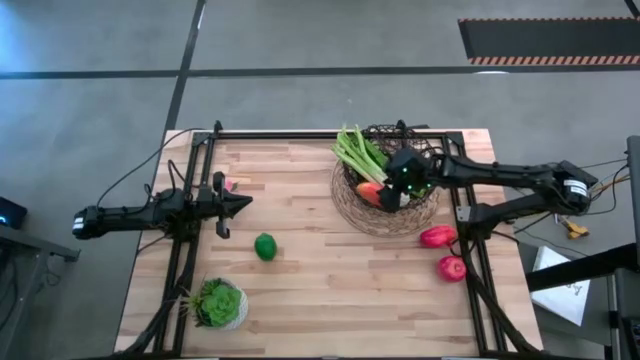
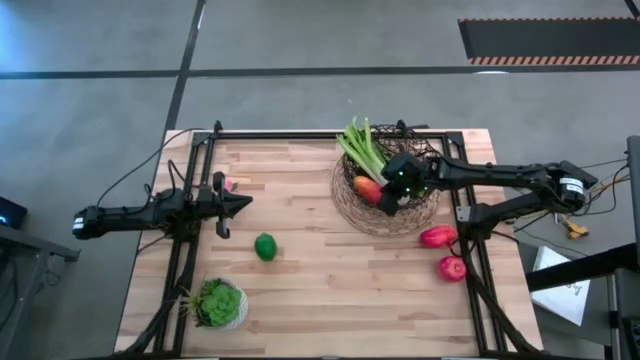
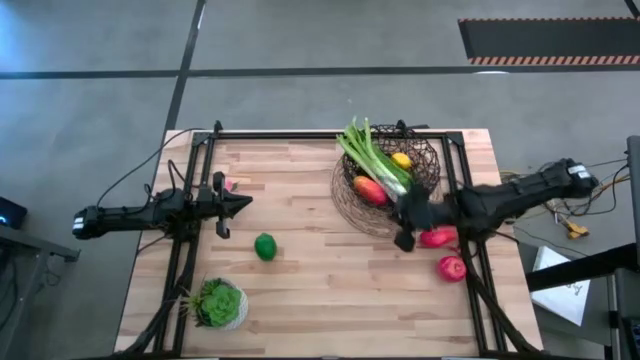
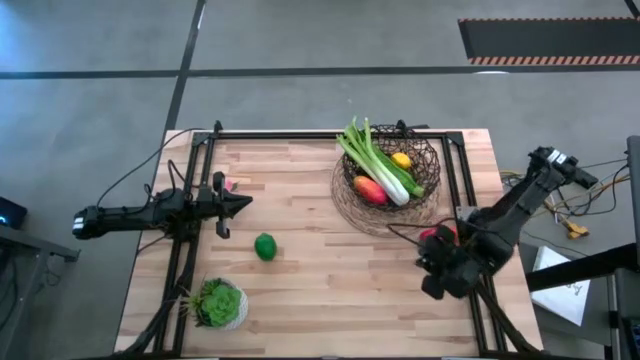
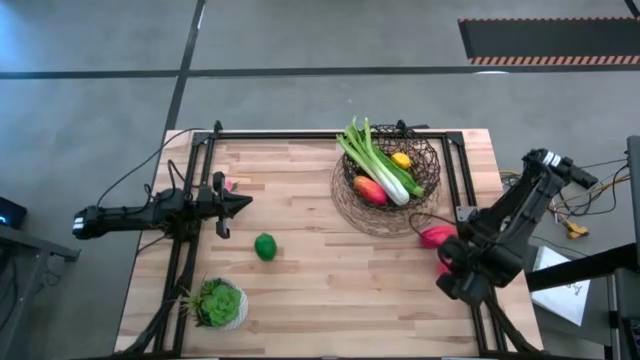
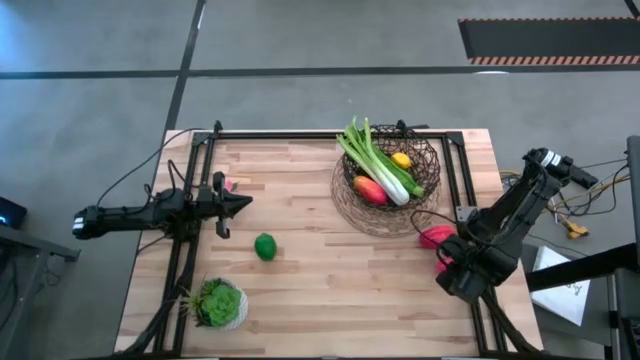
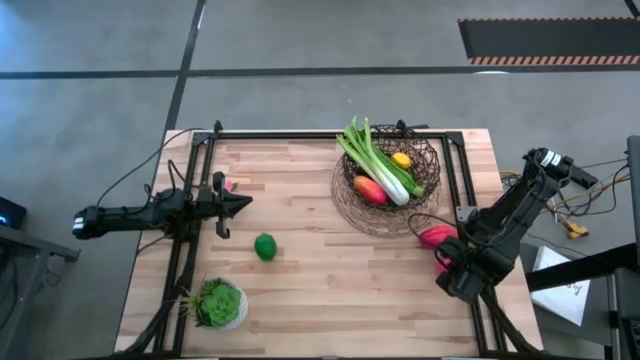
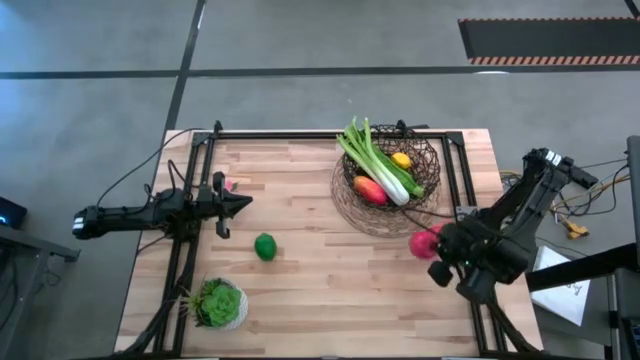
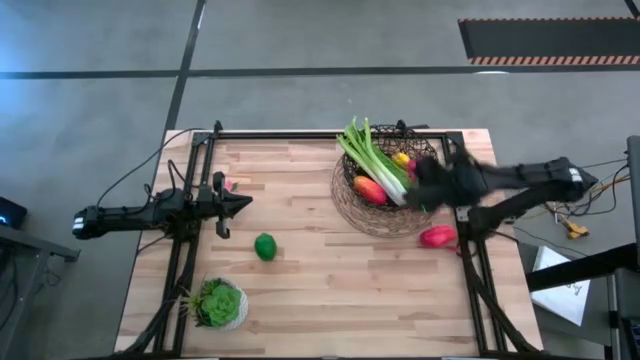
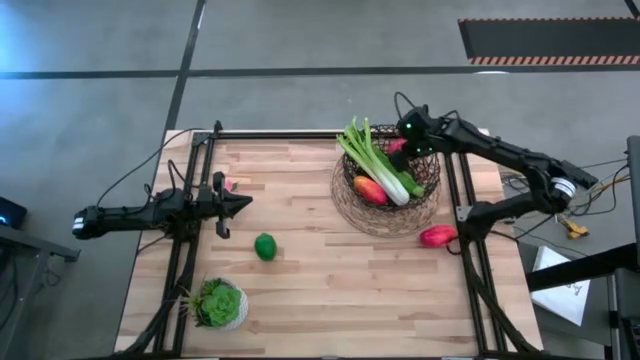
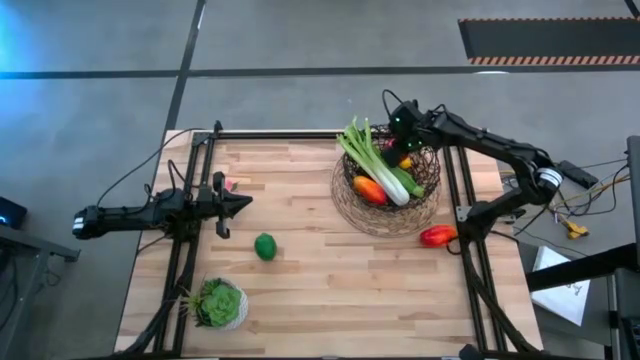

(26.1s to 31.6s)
Task: Build produce basket
Put the red apple into the wire basket

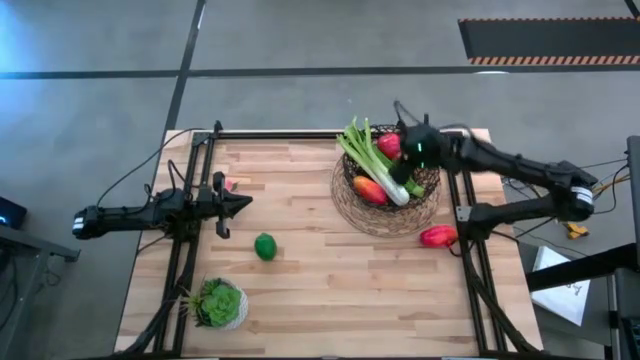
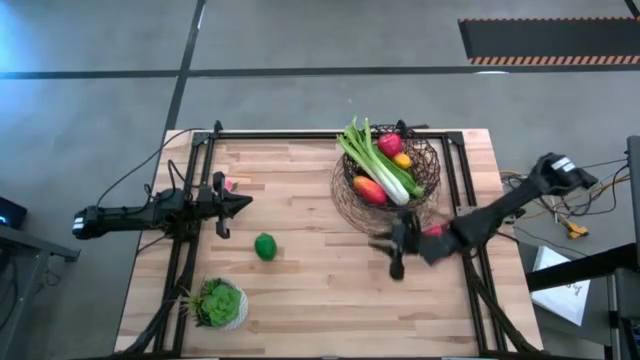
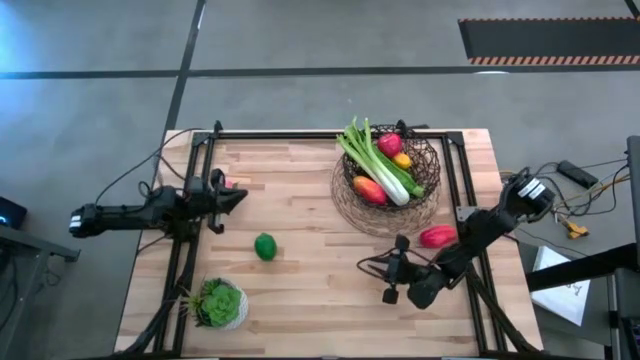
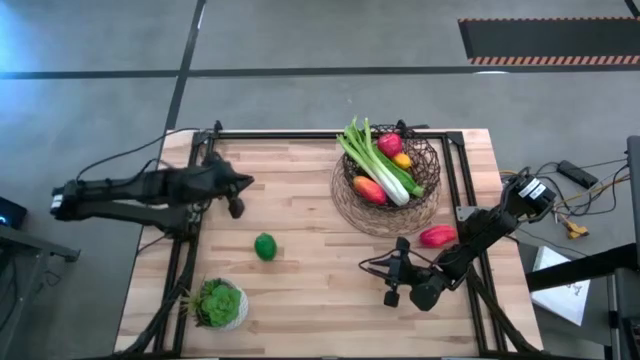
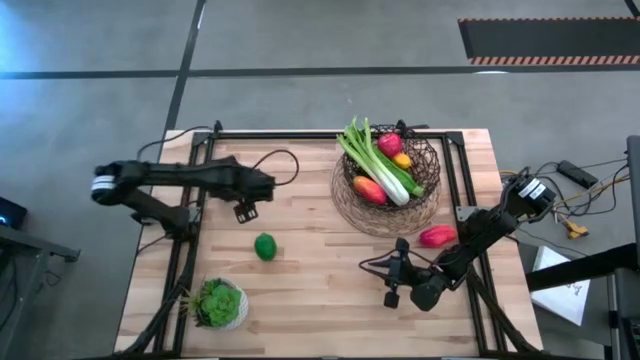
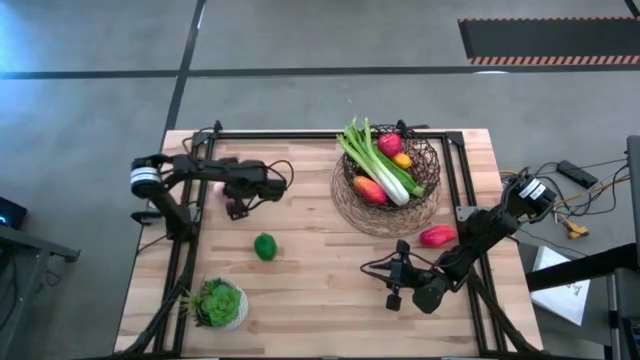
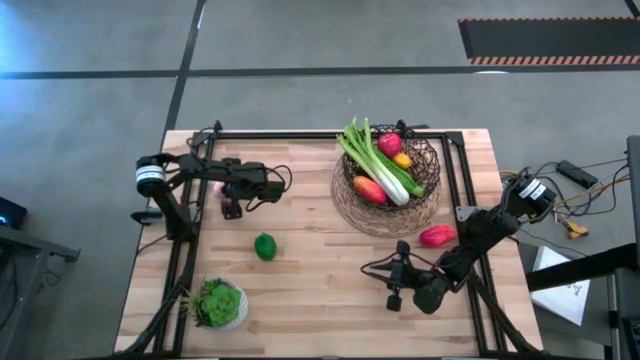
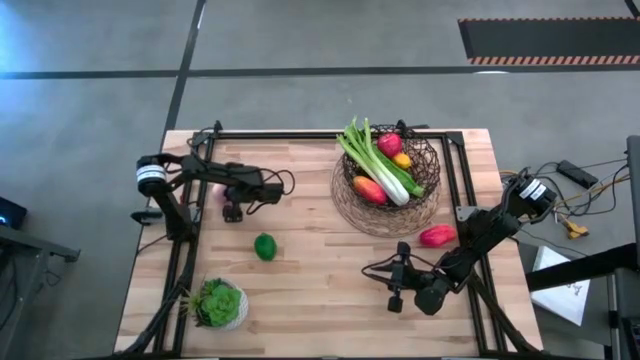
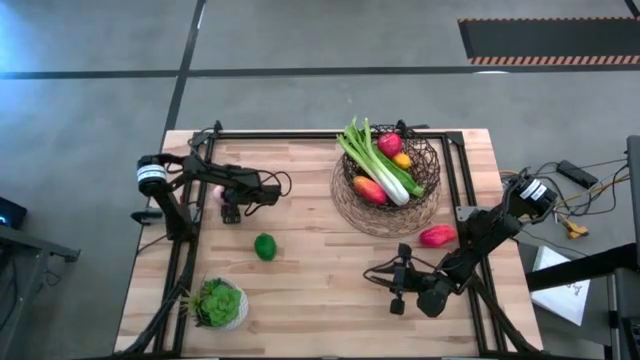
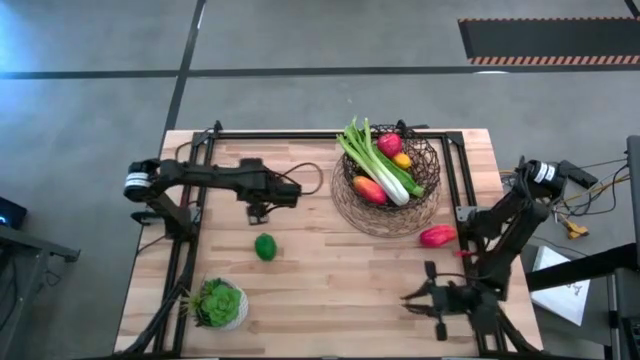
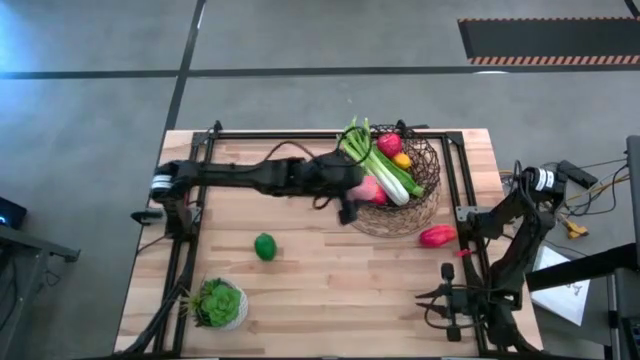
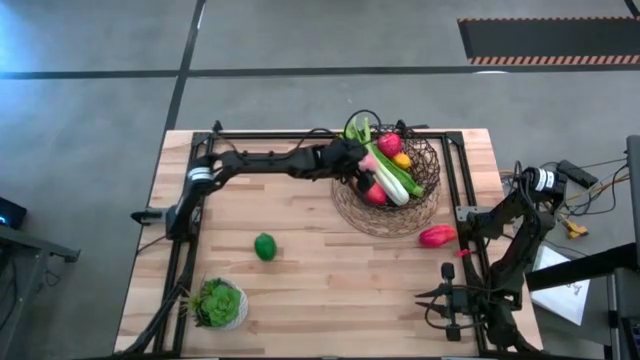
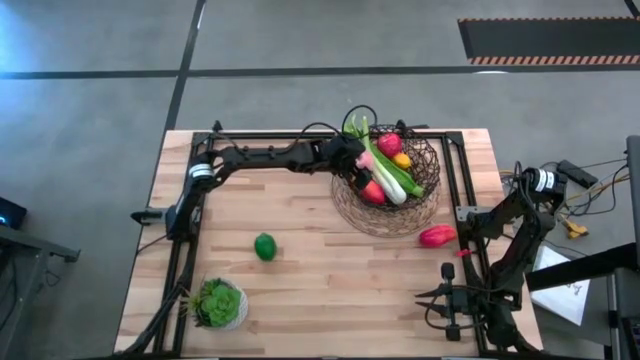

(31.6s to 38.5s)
Put the pink peach into the wire basket

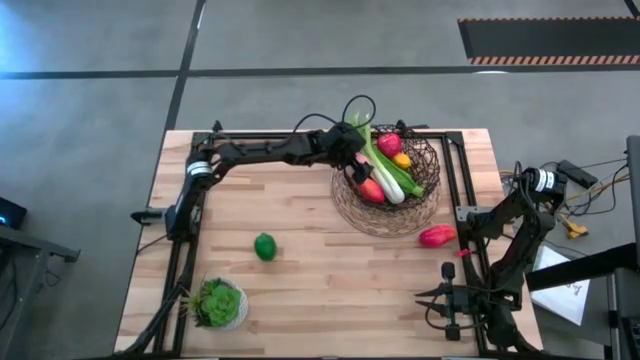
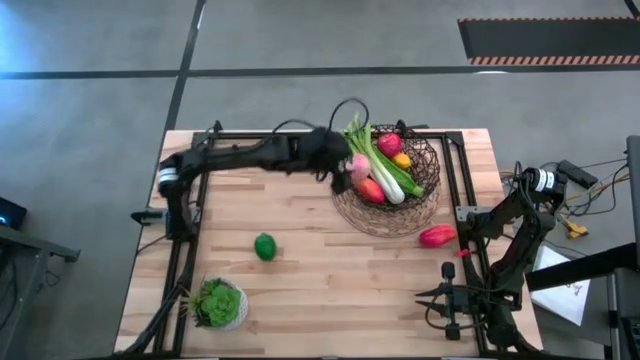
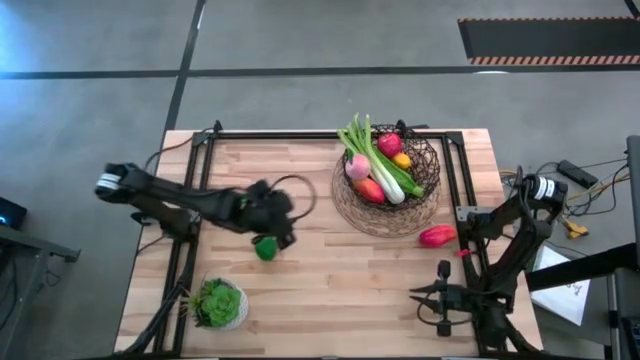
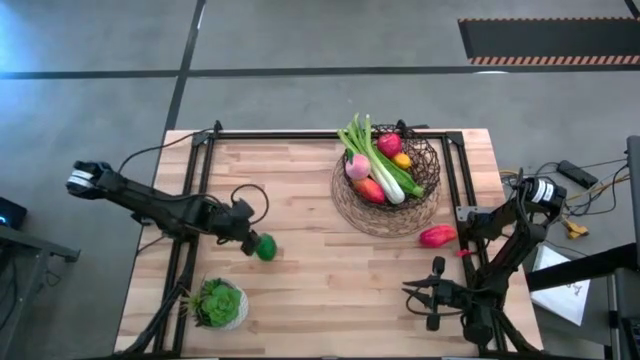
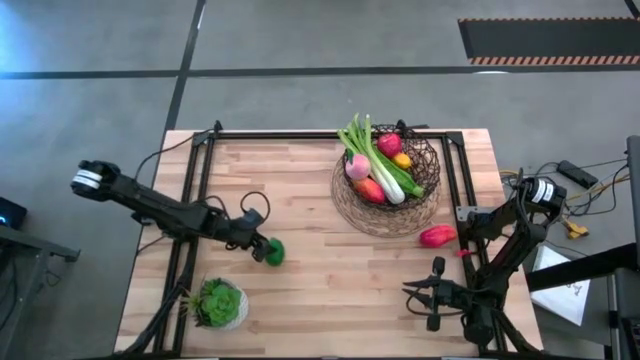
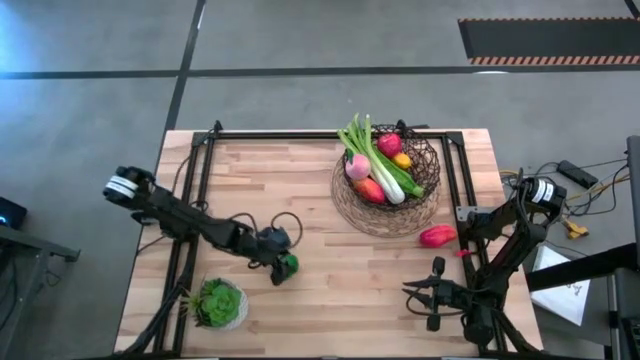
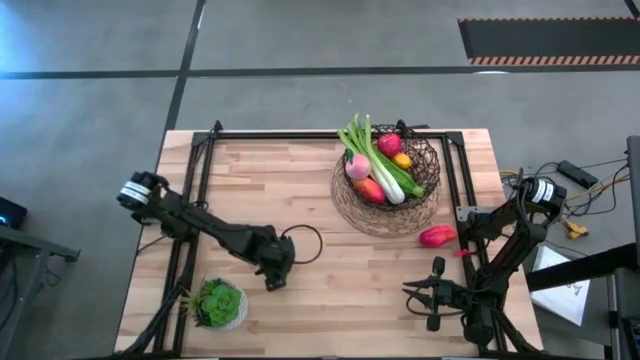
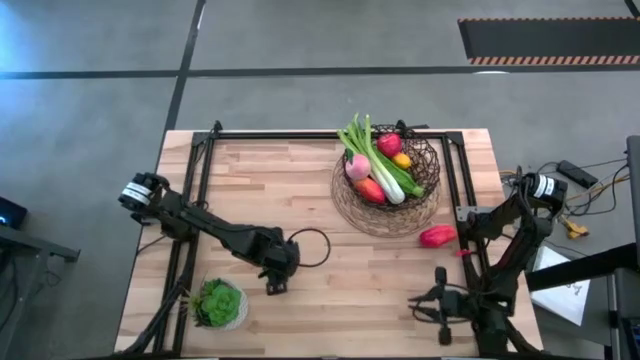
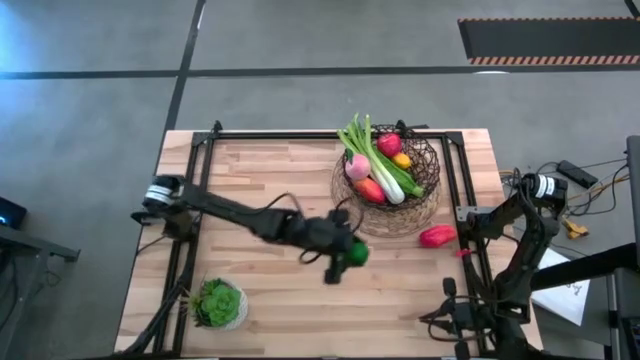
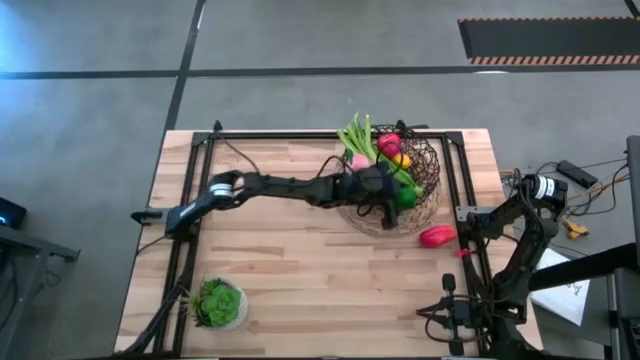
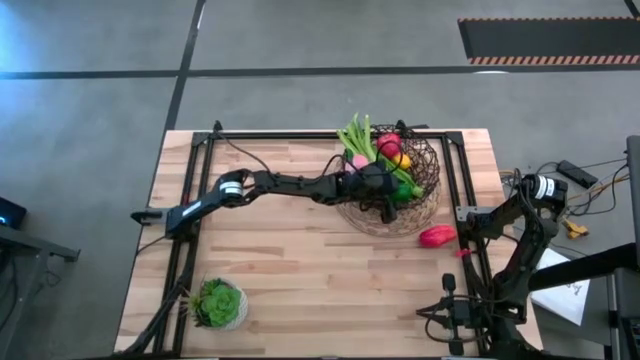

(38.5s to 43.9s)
Put the green lime into the wire basket

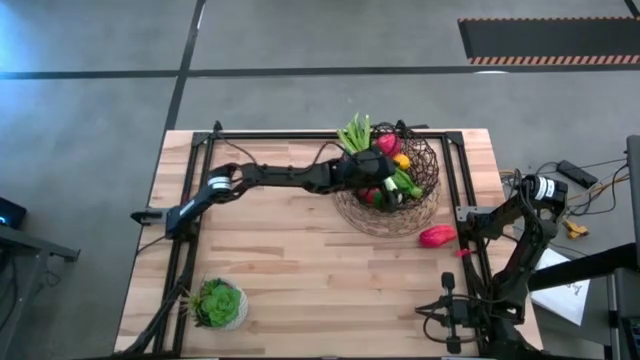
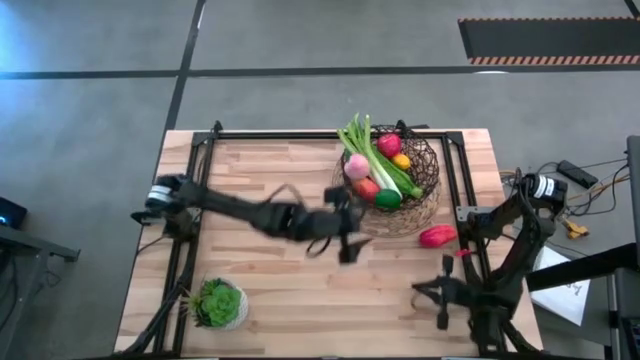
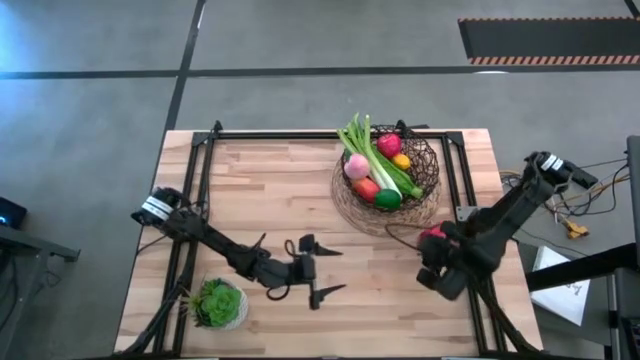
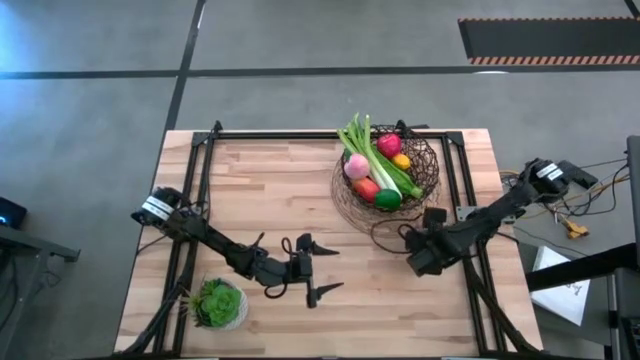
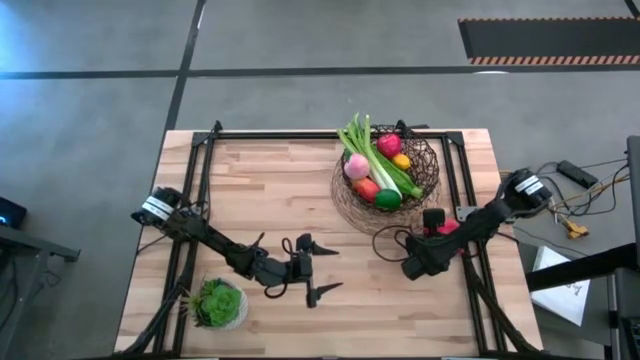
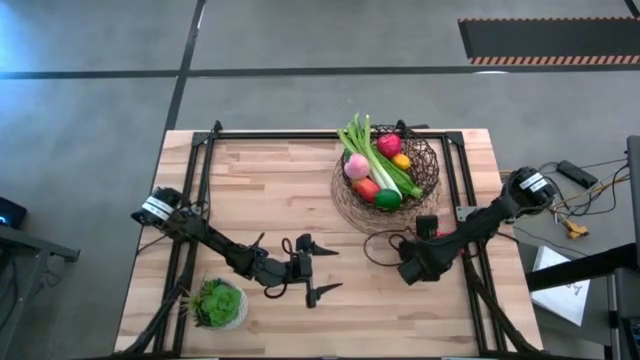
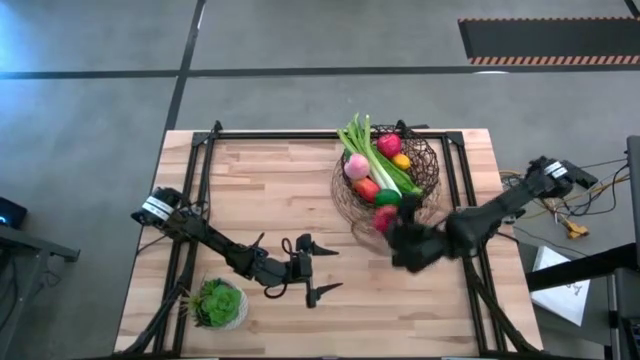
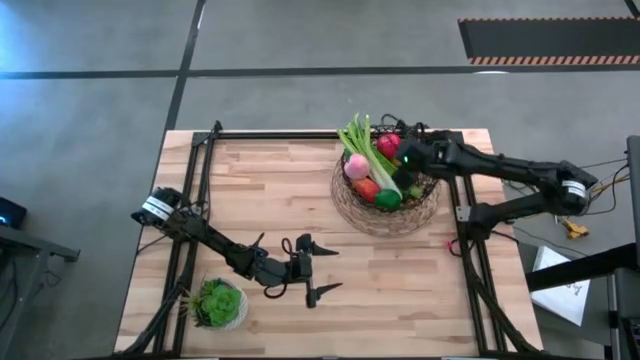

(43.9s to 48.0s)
Put the mango into the wire basket
